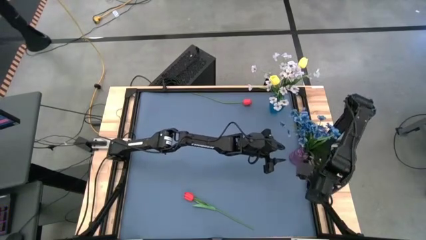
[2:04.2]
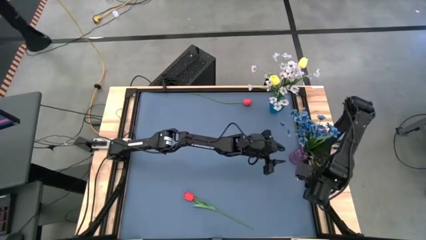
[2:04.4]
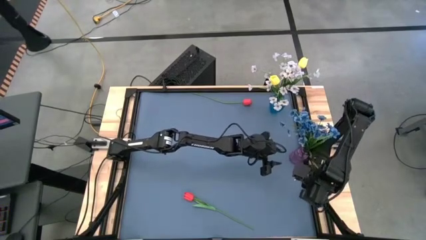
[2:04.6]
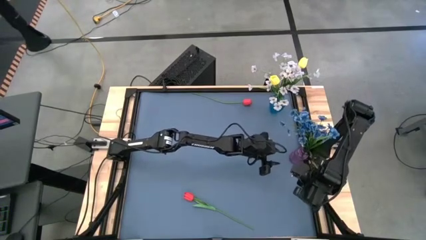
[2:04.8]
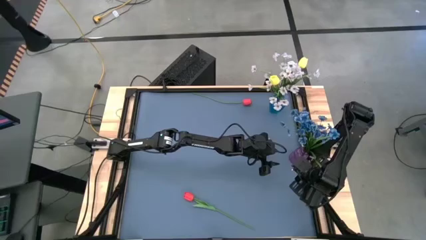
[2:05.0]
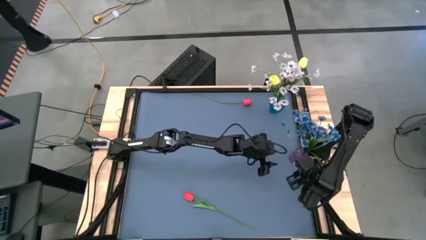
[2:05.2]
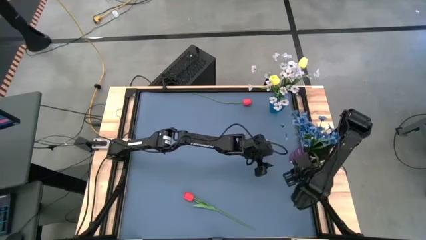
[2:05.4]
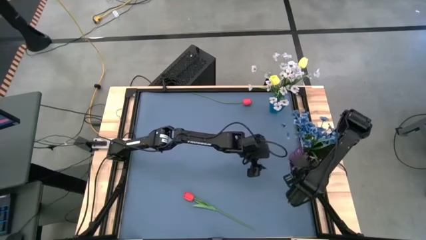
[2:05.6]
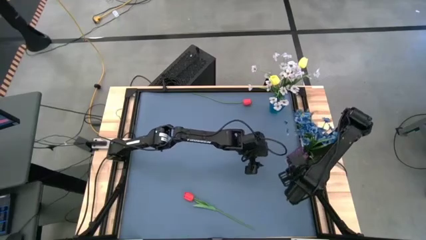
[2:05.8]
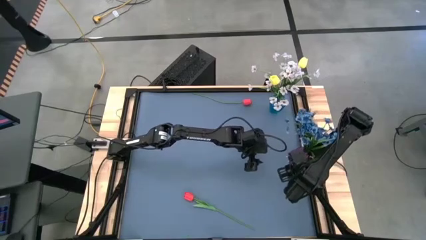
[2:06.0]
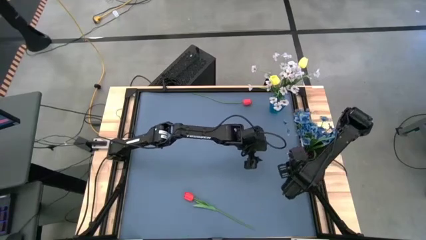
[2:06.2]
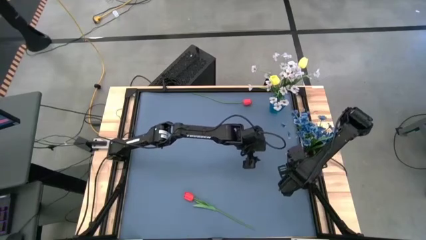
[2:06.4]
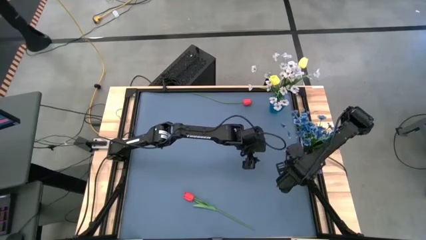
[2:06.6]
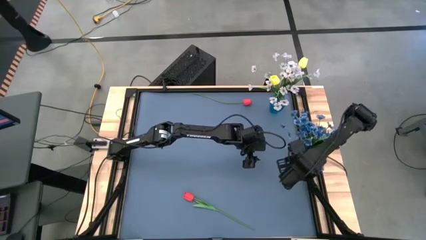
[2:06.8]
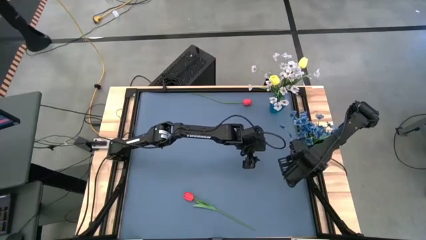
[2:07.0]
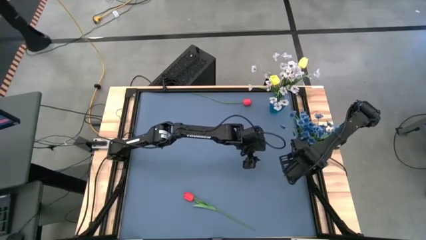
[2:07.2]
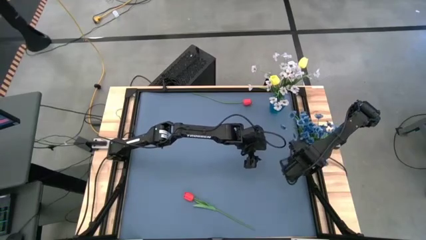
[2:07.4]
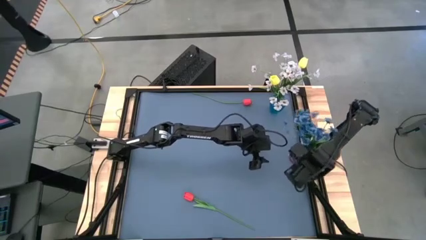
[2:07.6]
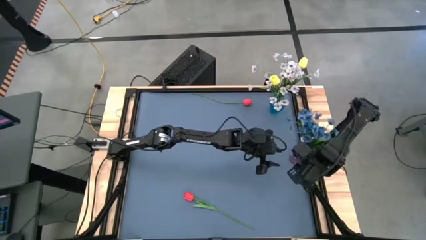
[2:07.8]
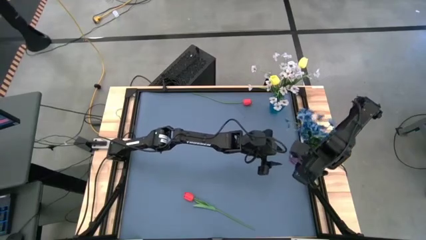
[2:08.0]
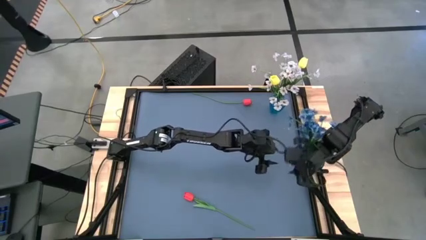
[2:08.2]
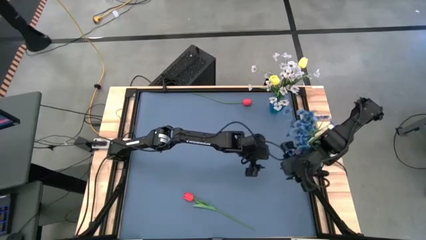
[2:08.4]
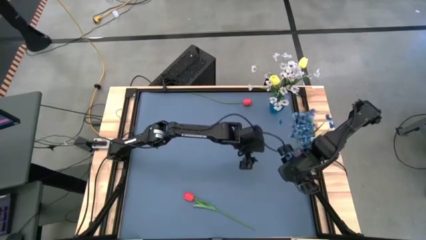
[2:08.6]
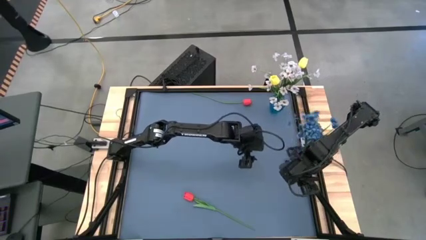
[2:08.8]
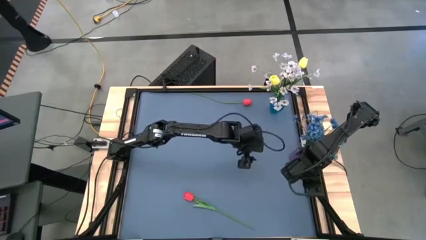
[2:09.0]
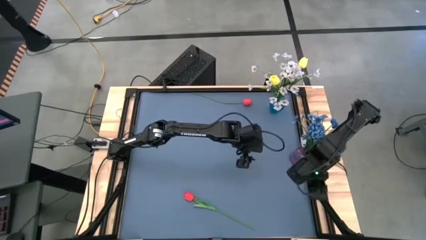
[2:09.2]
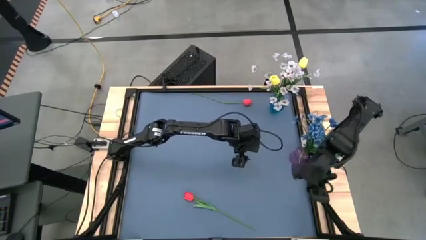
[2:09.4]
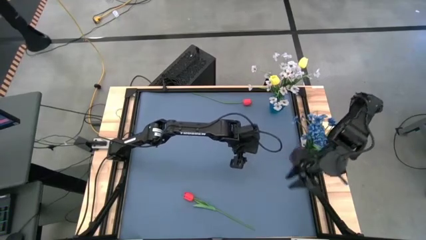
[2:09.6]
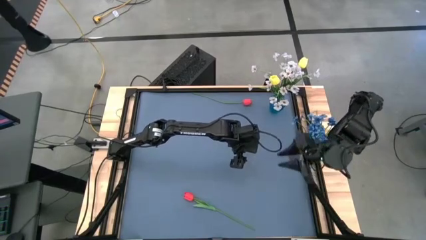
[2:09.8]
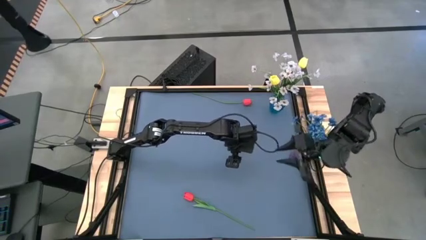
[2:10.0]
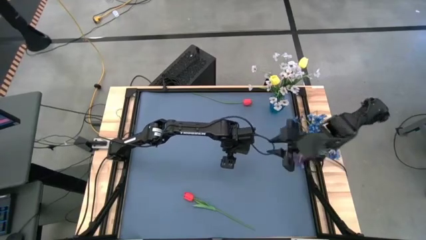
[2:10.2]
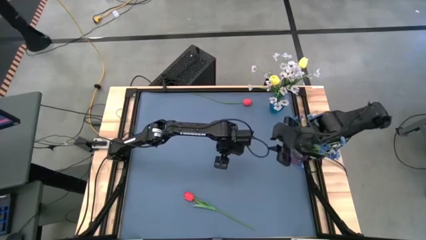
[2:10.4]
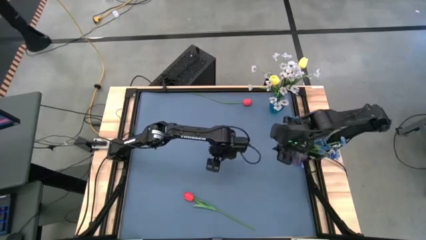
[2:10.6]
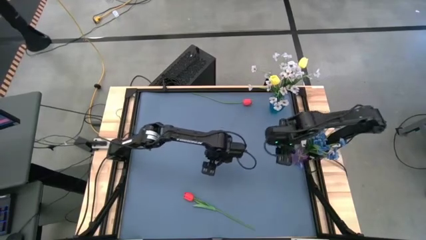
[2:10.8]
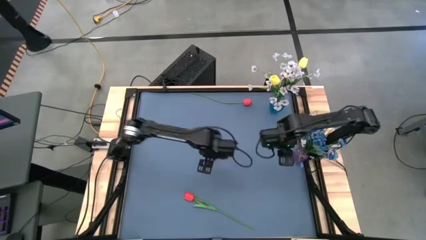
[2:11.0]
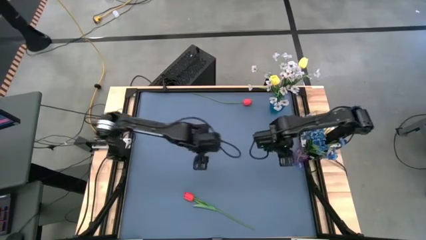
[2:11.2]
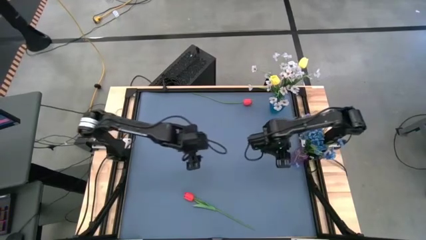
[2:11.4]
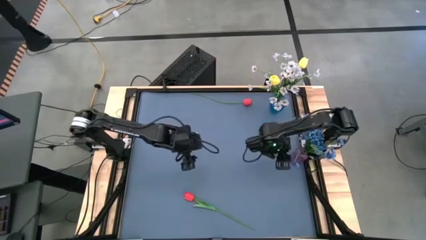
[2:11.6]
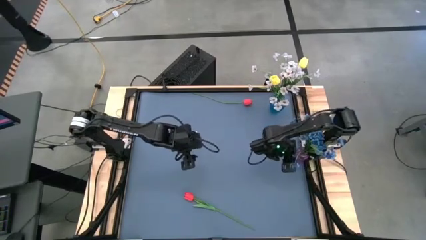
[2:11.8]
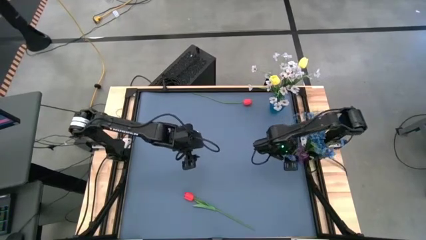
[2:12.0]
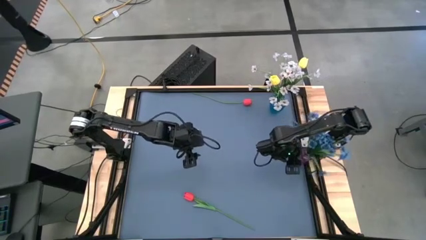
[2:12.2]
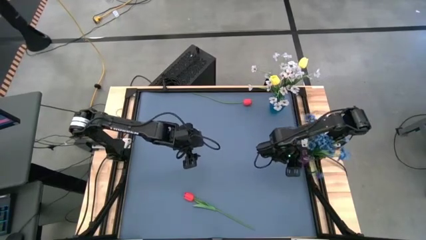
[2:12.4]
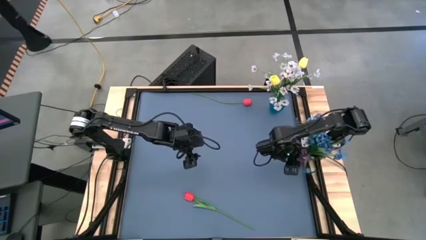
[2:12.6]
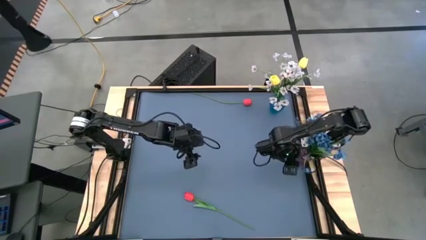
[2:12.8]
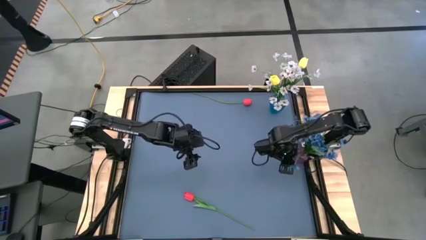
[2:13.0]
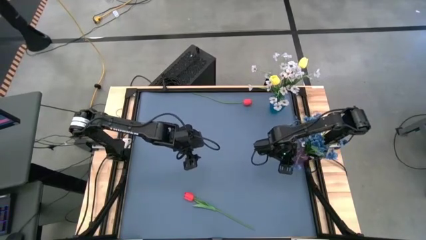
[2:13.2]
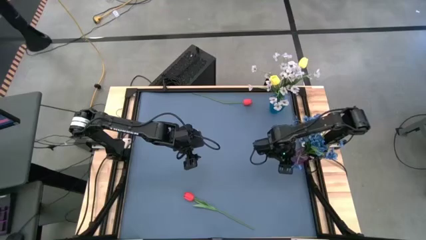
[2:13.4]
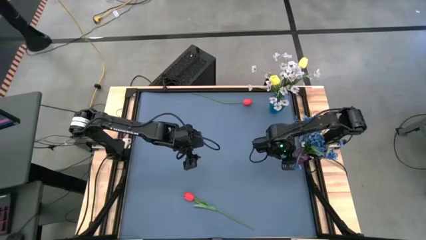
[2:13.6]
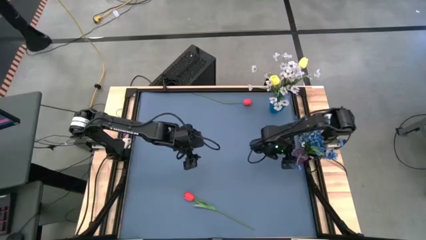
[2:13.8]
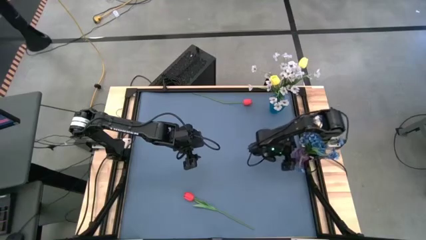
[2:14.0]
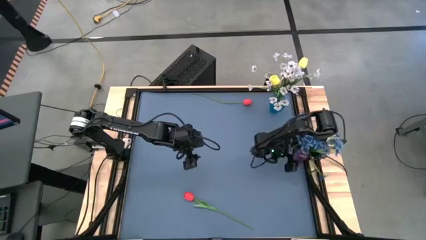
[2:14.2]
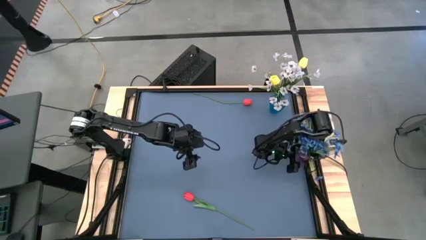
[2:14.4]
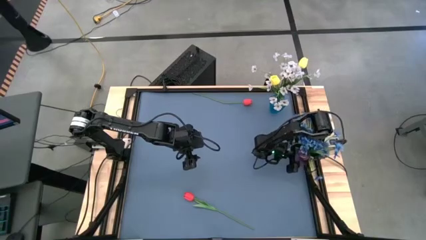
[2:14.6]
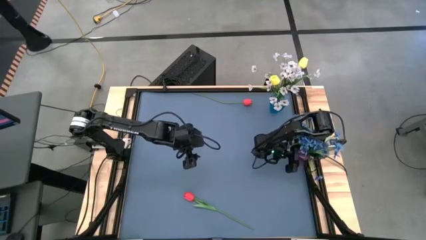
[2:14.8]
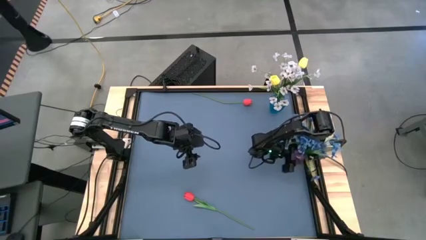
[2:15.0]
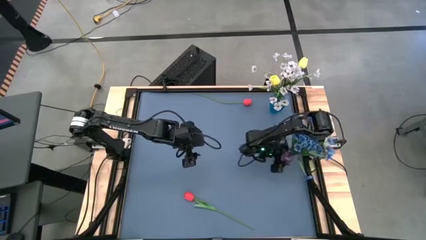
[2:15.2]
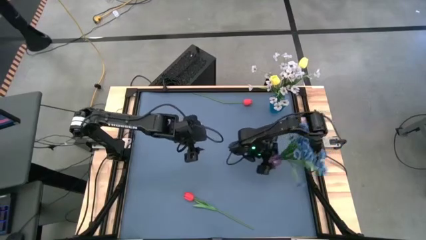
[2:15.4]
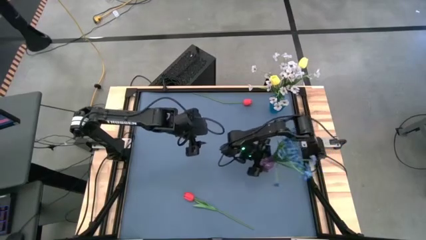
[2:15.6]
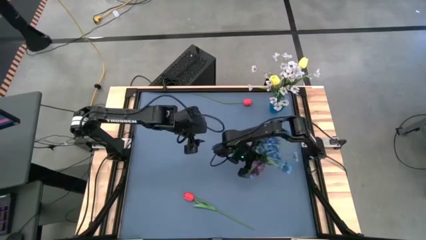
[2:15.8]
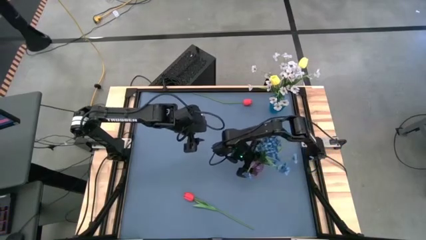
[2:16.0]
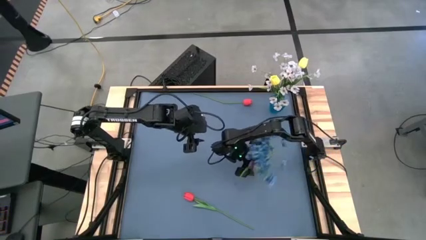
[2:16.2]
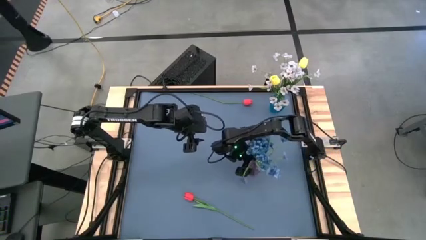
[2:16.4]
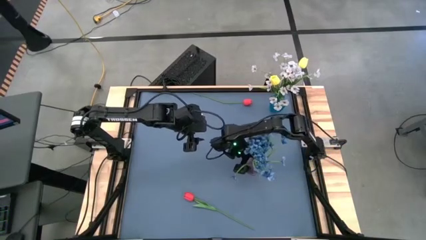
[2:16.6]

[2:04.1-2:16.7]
Task: Sort flowers into vase by color
Adjust the violet vase
